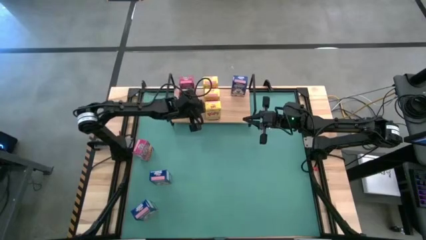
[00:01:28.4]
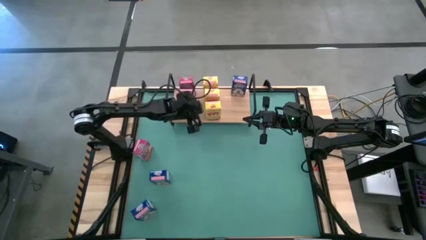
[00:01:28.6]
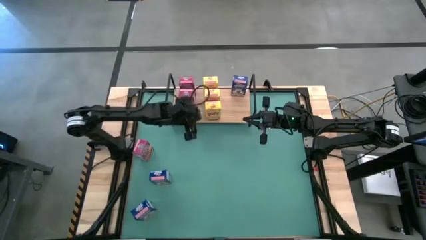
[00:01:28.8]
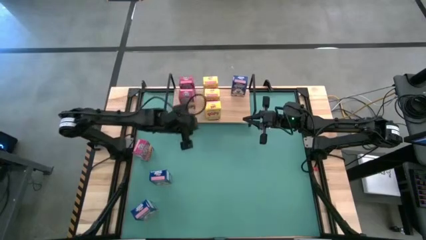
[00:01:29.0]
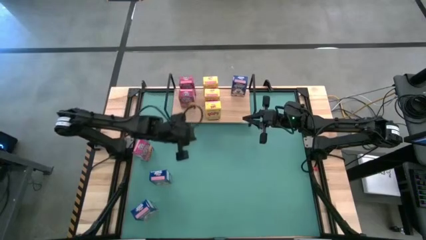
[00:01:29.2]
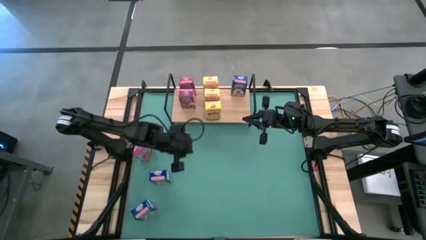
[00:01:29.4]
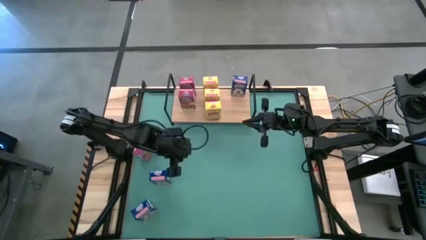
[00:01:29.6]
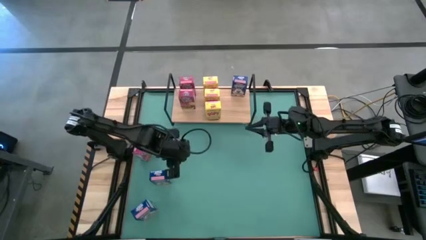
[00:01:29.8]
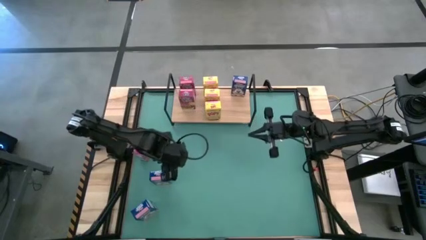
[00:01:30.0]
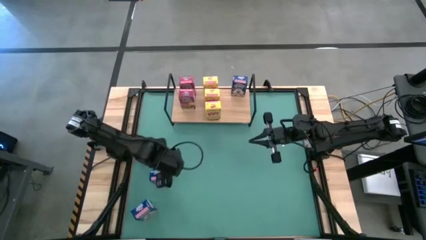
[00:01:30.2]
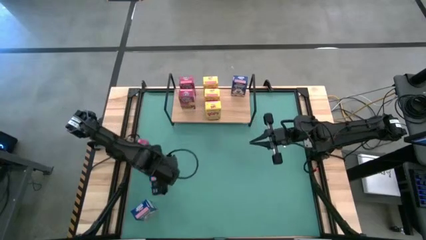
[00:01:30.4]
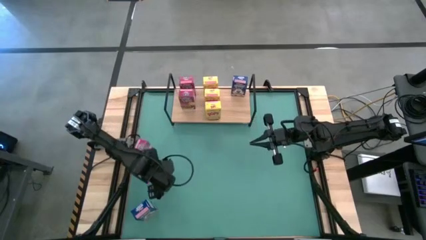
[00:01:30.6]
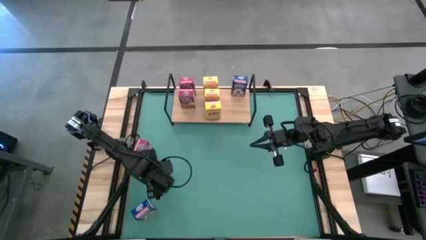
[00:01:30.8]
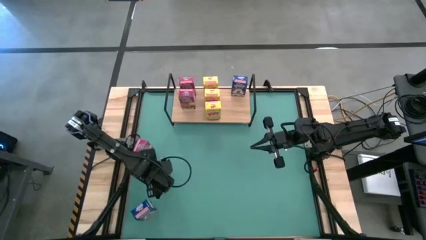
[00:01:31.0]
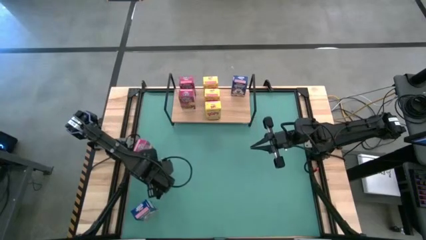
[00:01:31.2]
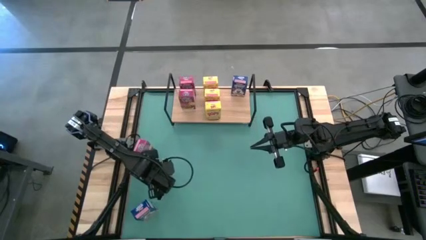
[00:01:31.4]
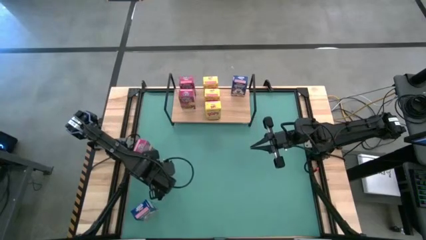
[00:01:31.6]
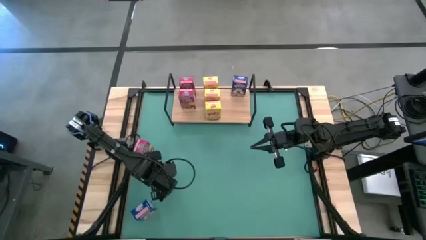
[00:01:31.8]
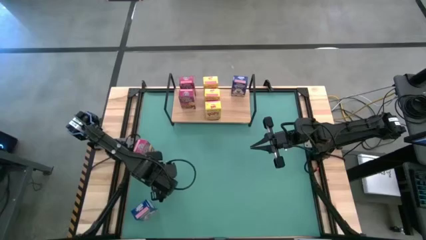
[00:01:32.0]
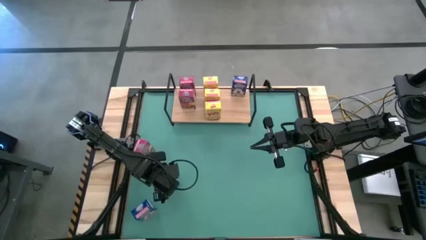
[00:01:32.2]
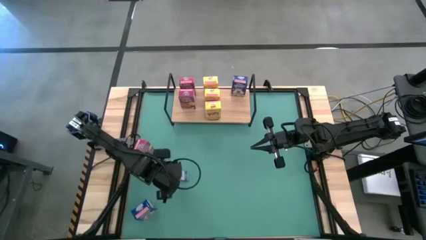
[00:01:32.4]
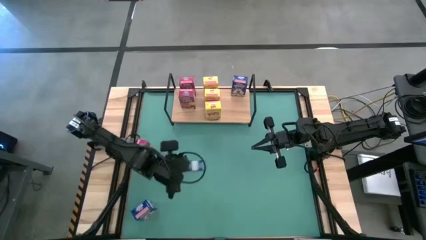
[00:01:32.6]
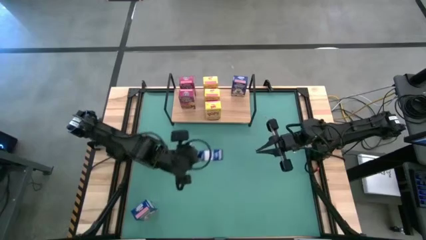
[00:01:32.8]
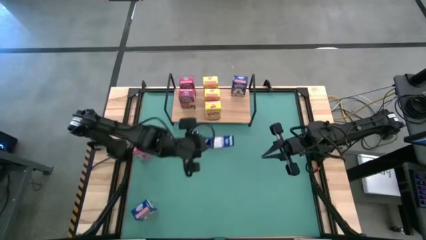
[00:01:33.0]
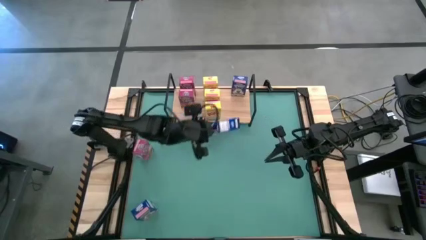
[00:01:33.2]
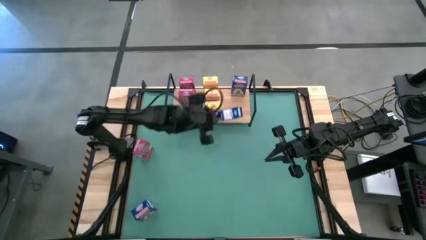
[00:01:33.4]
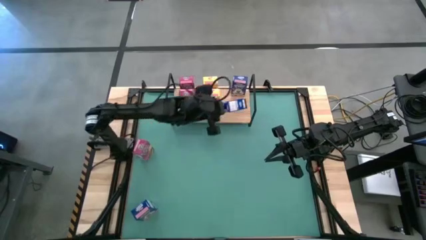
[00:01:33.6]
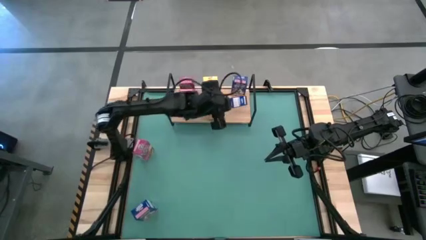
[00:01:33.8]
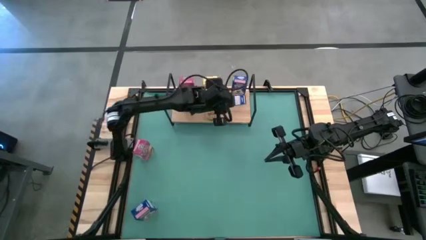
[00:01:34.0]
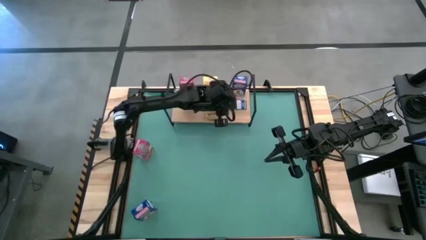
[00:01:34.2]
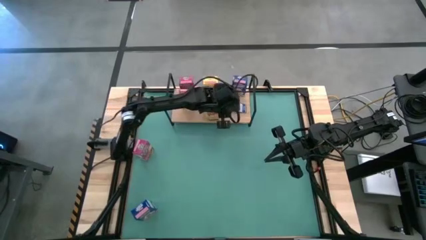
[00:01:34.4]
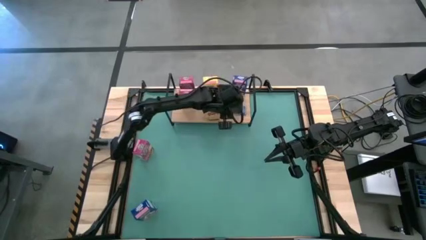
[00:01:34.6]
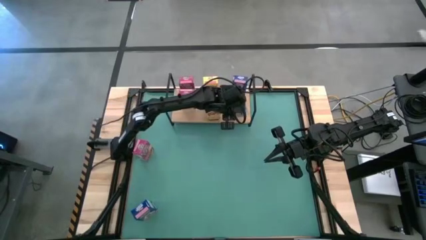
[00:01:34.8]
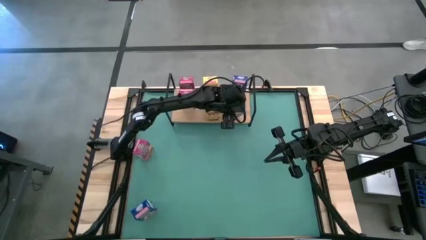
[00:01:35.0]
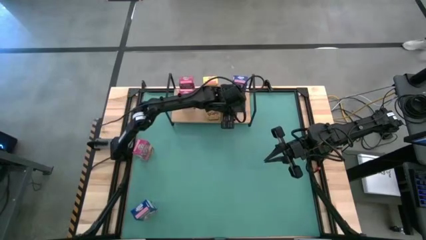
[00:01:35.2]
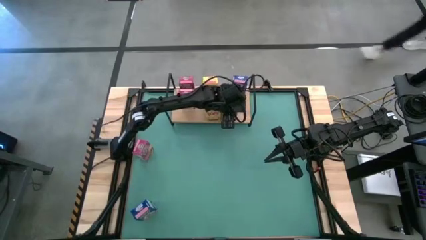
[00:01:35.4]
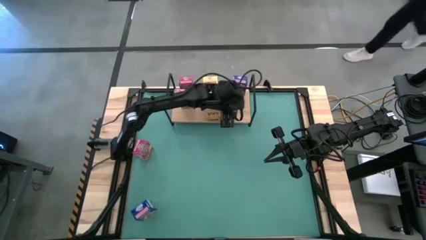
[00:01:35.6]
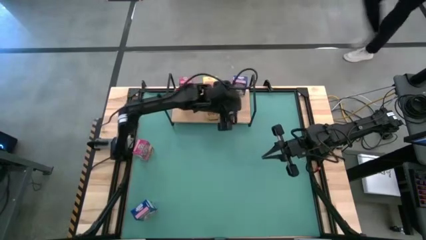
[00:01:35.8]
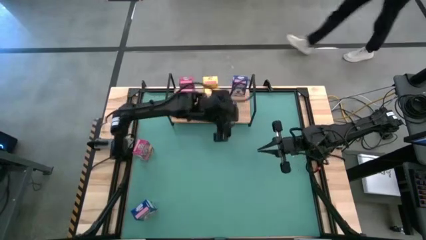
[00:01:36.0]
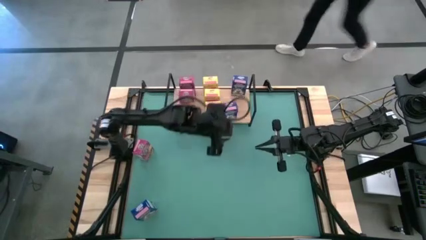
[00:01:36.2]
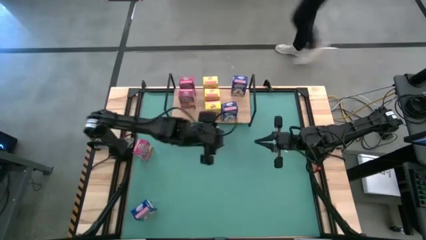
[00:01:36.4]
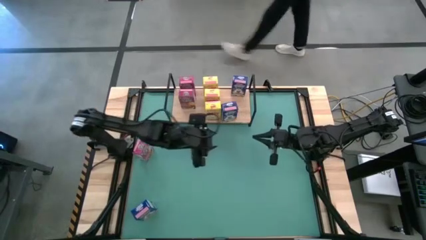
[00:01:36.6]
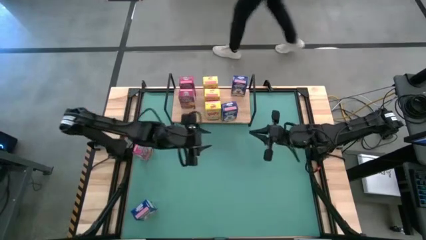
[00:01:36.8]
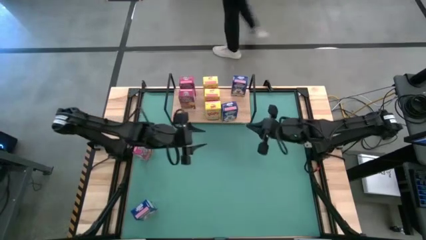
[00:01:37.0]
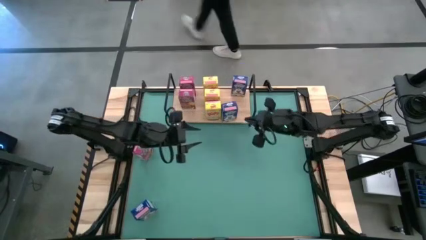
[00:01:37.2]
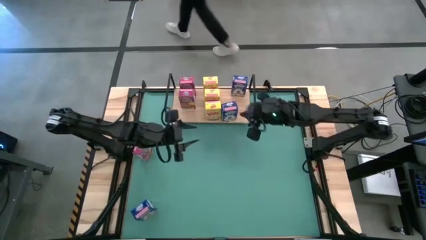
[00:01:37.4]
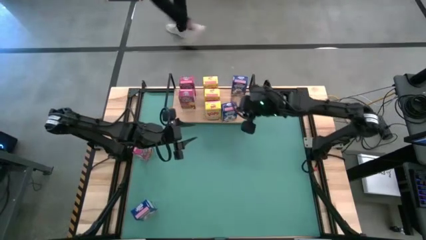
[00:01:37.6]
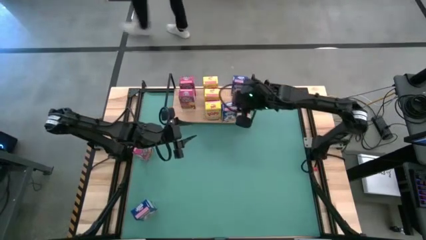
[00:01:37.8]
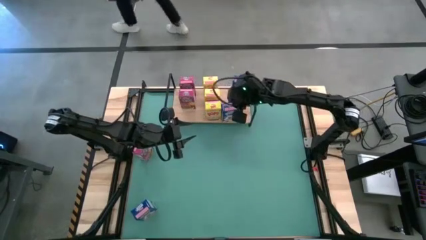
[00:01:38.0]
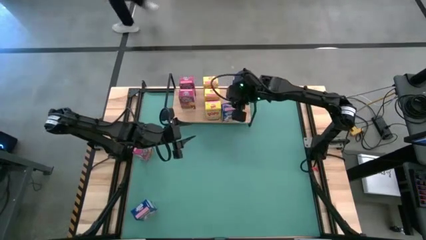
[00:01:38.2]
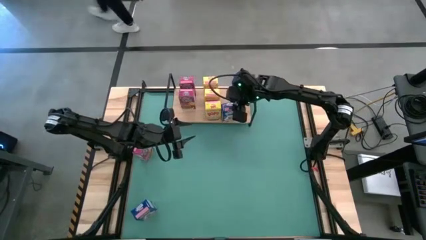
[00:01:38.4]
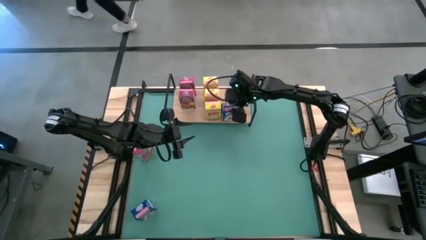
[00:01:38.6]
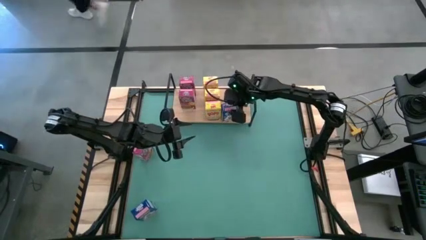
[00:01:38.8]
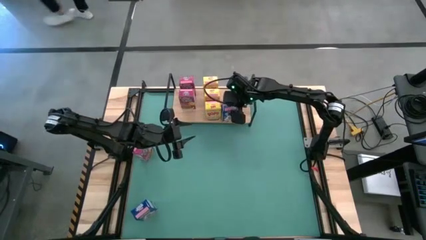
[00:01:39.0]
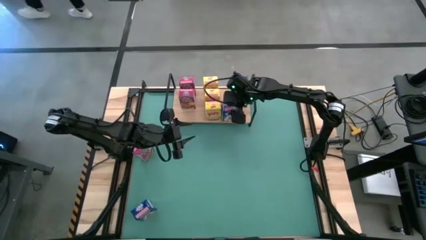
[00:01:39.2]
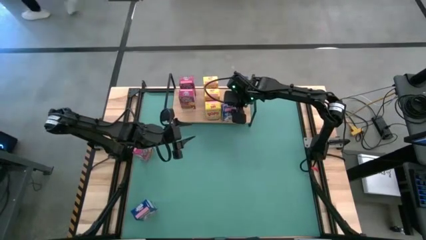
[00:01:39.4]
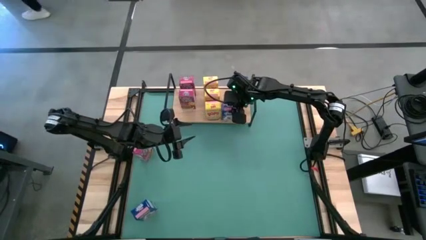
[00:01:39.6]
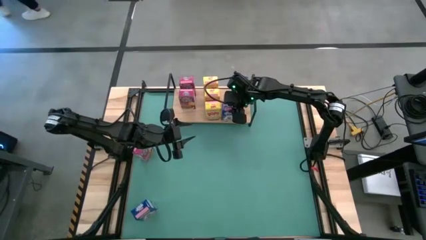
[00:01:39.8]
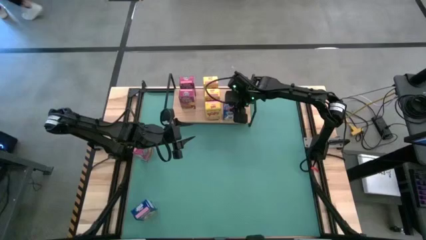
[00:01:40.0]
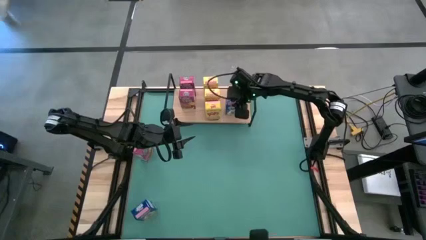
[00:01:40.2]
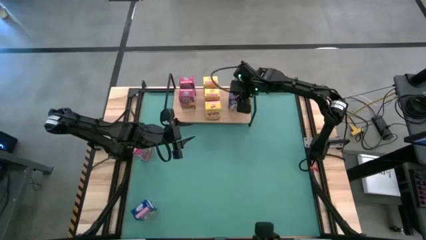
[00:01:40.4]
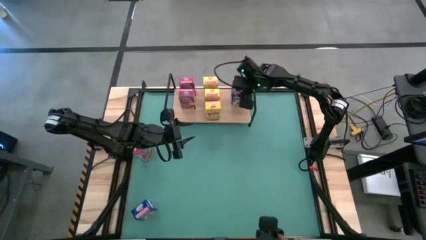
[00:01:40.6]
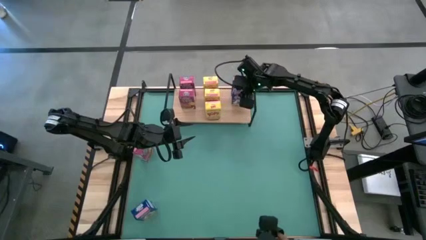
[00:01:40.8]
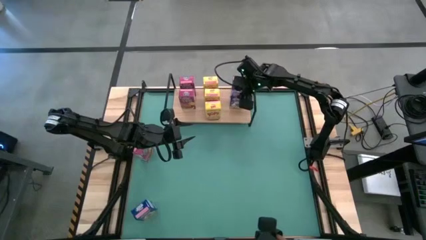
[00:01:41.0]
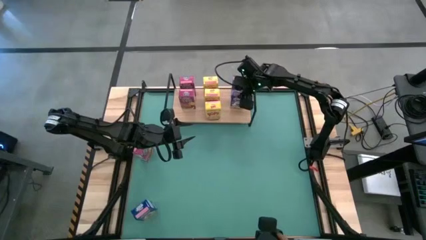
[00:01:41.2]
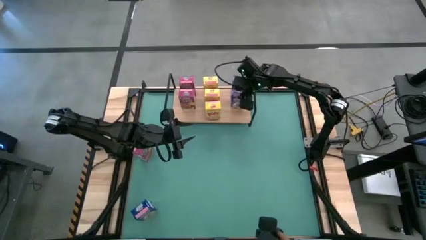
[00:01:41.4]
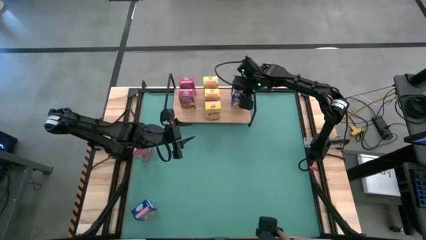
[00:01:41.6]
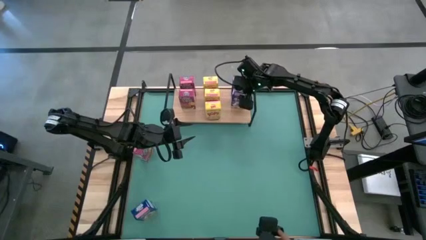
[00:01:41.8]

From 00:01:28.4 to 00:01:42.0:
Task: Stack cereal on shelf
Put the top blue cereal box on the shelf aligned with the other blue cereal box
